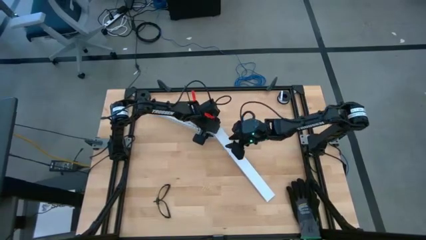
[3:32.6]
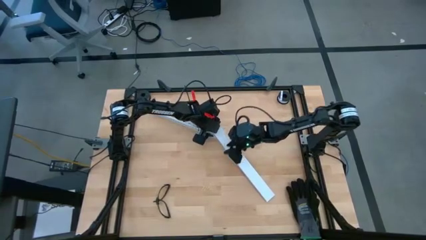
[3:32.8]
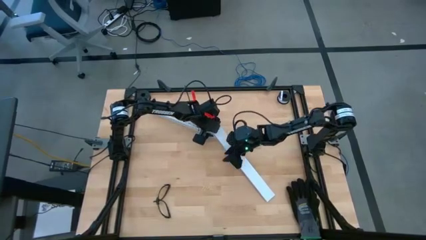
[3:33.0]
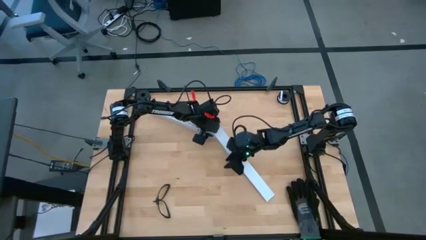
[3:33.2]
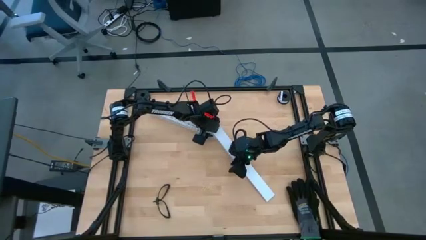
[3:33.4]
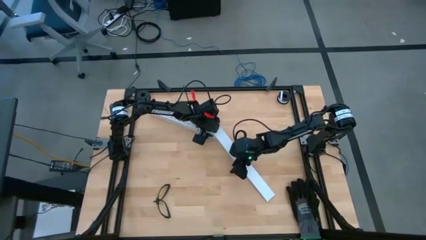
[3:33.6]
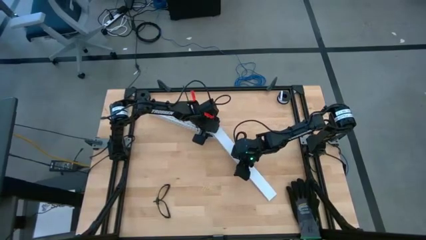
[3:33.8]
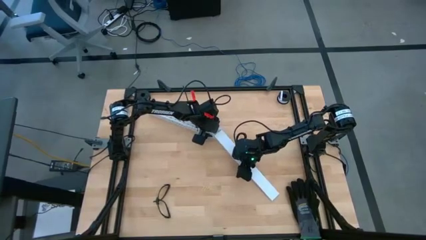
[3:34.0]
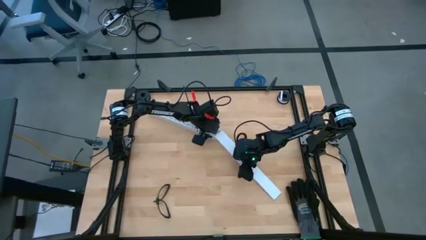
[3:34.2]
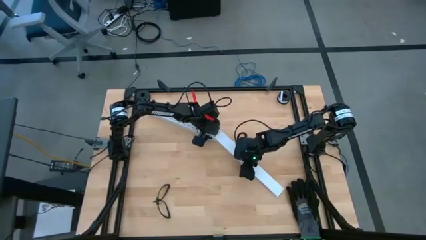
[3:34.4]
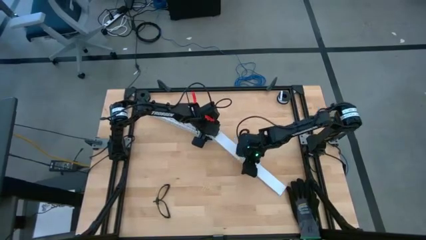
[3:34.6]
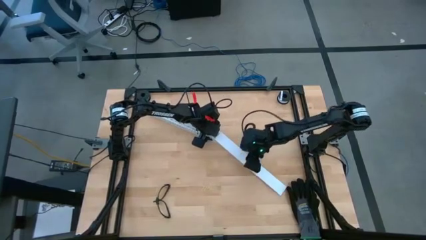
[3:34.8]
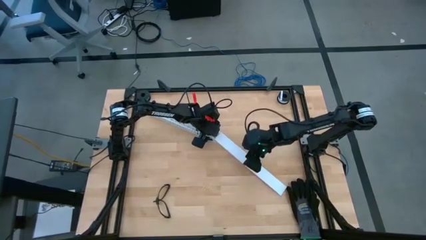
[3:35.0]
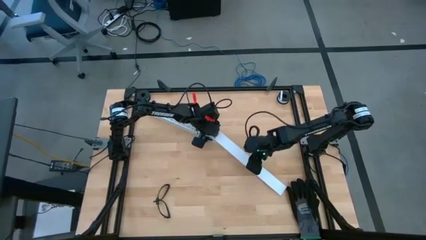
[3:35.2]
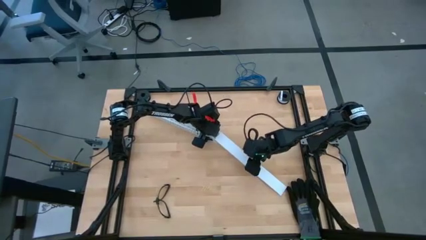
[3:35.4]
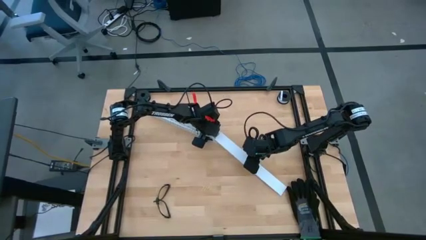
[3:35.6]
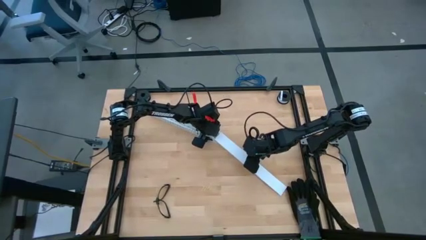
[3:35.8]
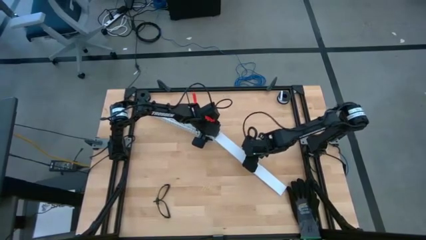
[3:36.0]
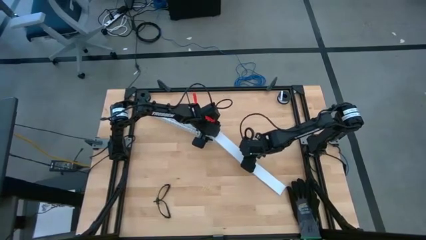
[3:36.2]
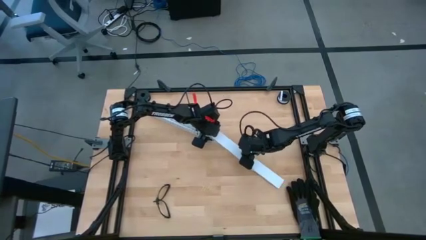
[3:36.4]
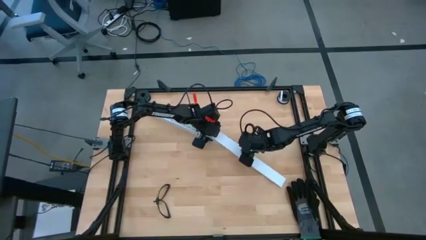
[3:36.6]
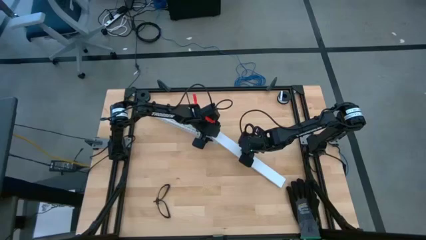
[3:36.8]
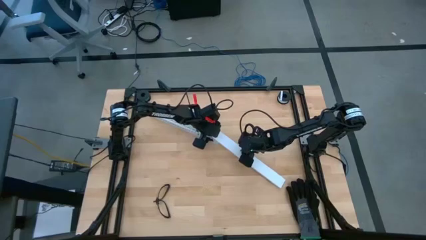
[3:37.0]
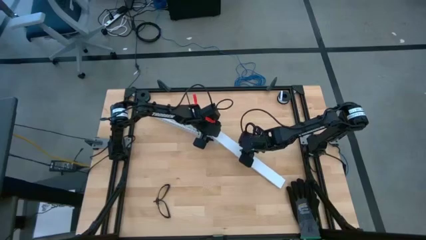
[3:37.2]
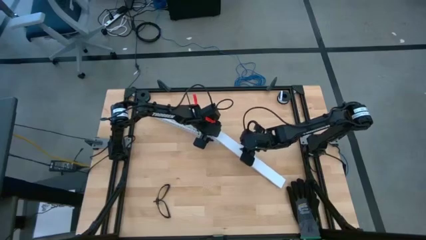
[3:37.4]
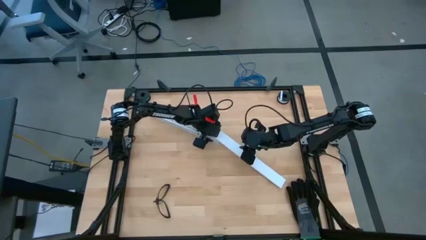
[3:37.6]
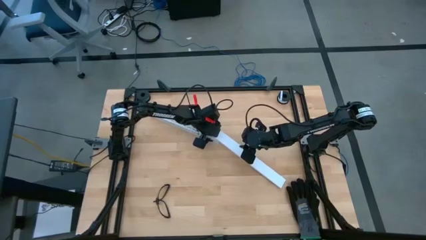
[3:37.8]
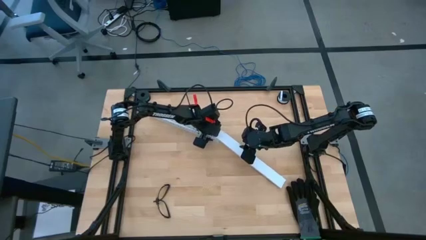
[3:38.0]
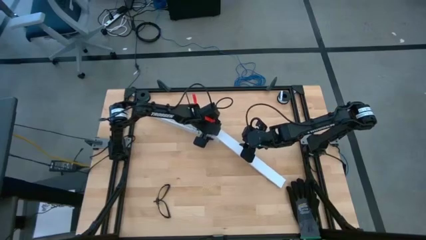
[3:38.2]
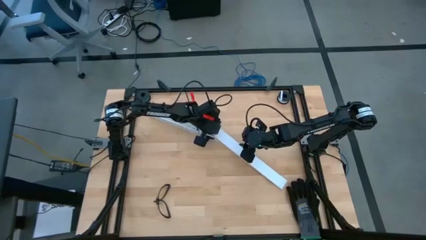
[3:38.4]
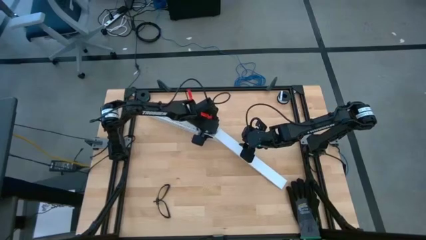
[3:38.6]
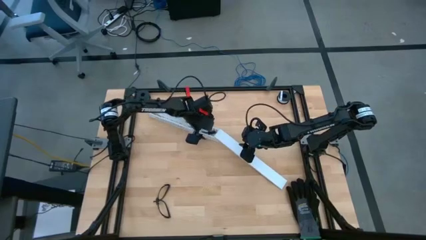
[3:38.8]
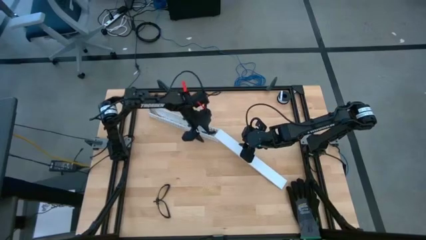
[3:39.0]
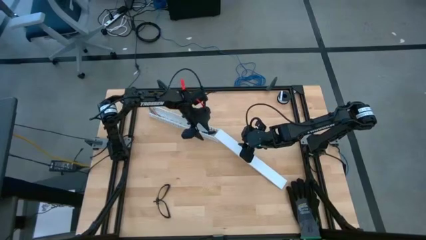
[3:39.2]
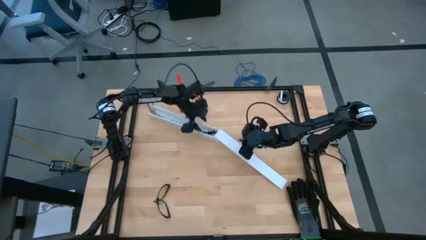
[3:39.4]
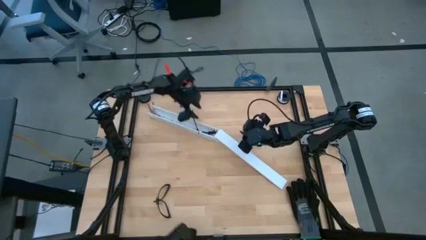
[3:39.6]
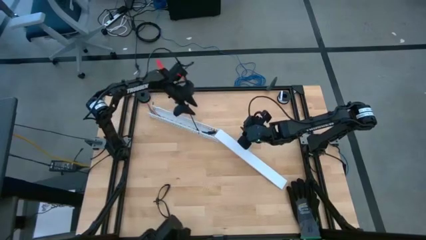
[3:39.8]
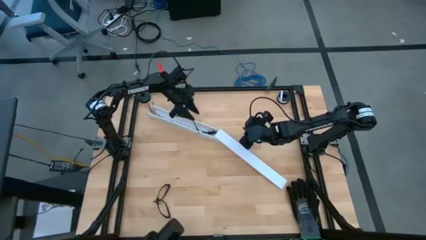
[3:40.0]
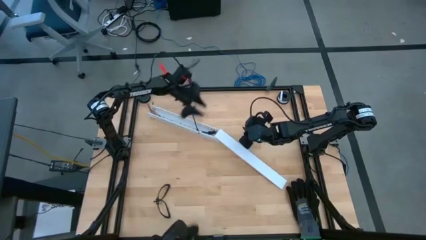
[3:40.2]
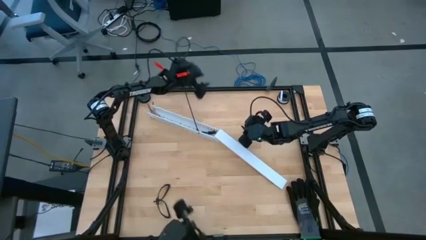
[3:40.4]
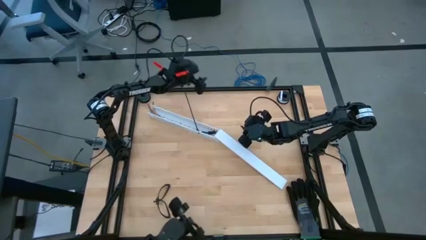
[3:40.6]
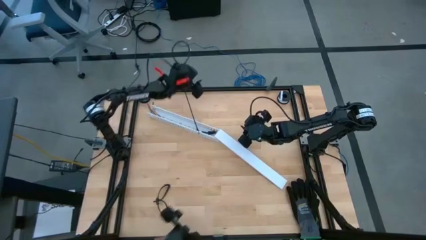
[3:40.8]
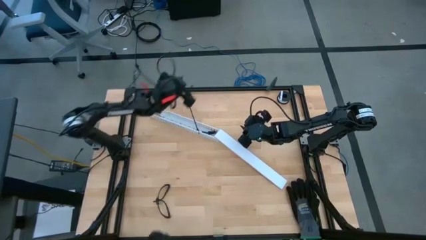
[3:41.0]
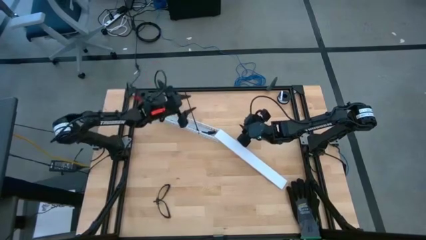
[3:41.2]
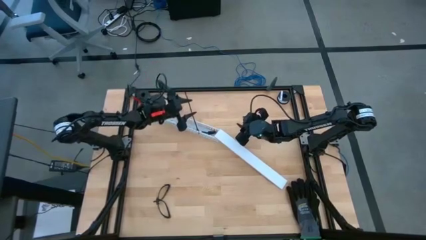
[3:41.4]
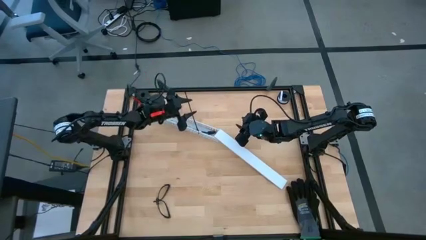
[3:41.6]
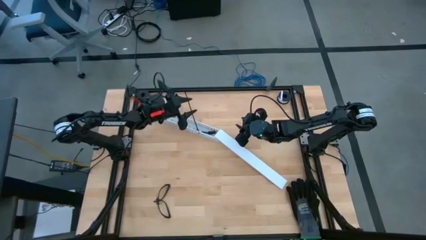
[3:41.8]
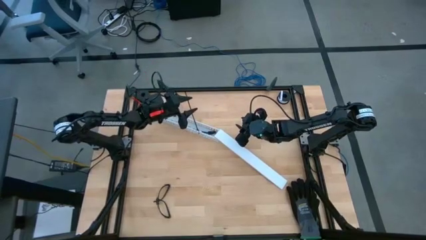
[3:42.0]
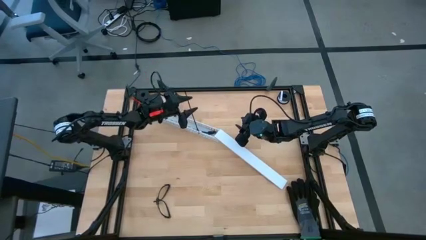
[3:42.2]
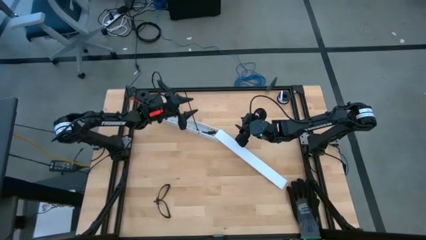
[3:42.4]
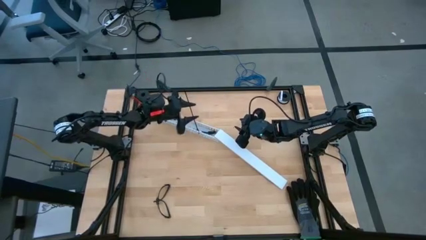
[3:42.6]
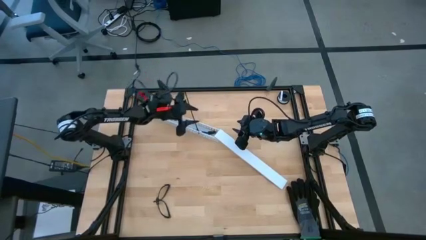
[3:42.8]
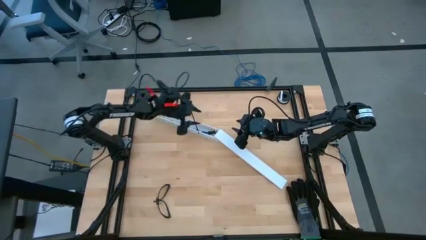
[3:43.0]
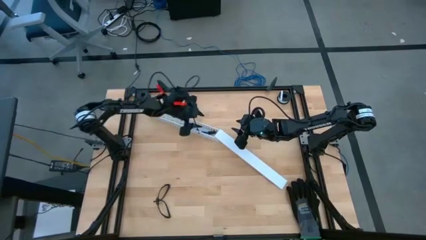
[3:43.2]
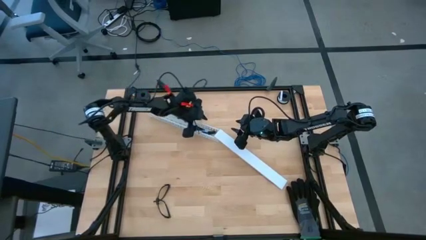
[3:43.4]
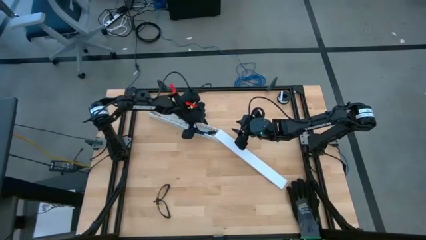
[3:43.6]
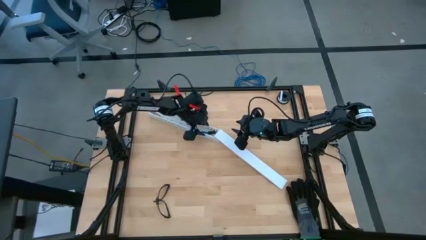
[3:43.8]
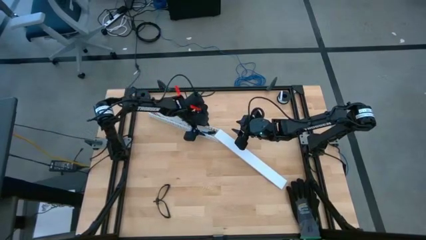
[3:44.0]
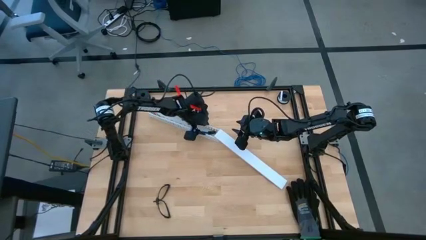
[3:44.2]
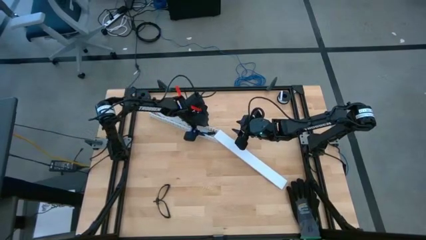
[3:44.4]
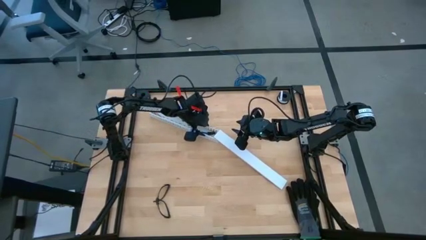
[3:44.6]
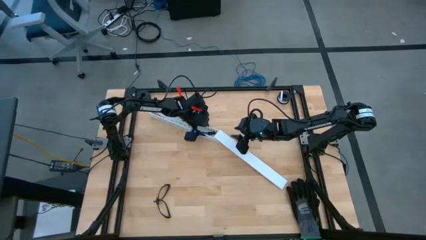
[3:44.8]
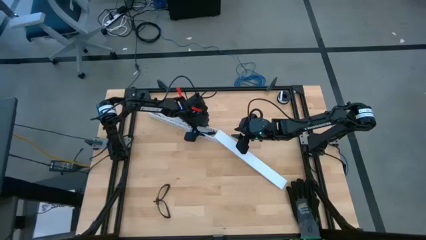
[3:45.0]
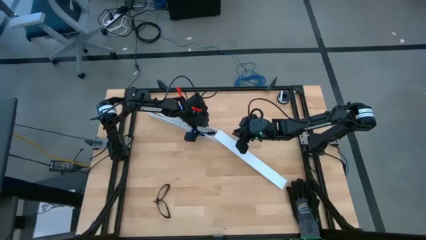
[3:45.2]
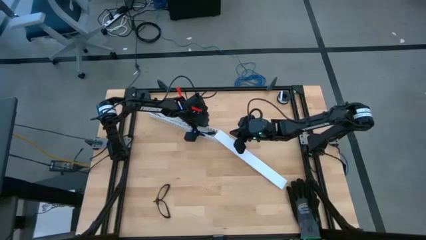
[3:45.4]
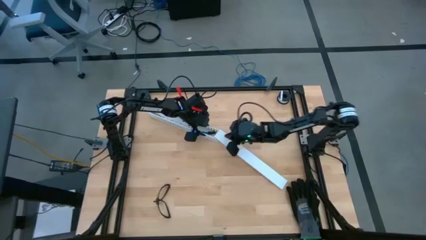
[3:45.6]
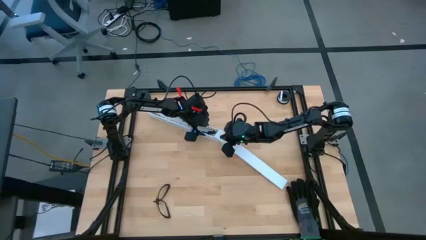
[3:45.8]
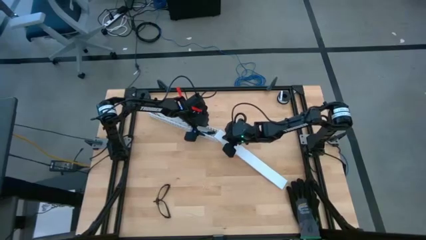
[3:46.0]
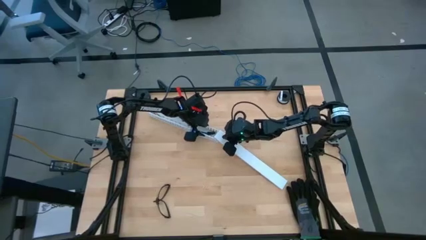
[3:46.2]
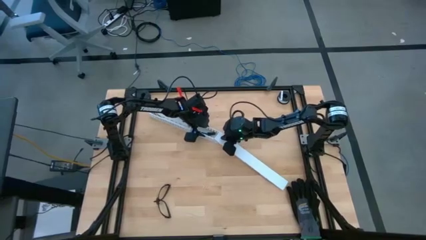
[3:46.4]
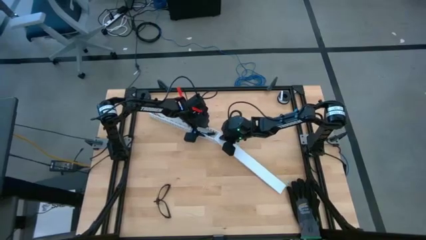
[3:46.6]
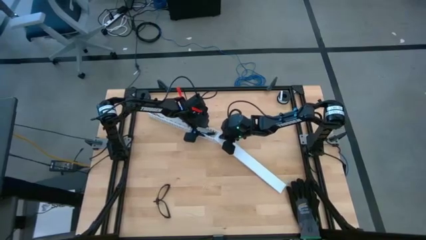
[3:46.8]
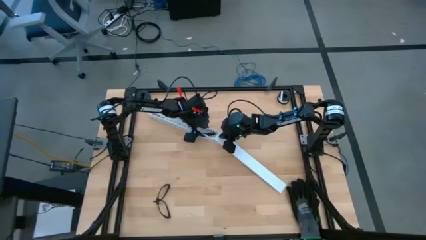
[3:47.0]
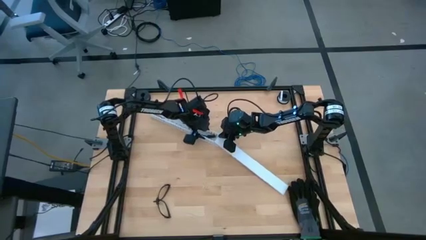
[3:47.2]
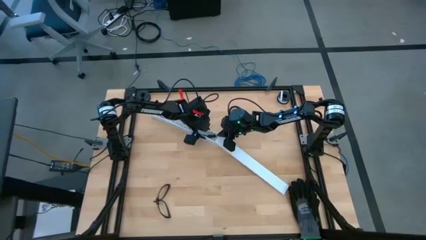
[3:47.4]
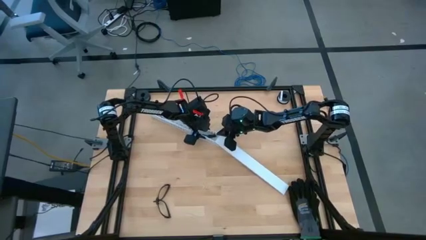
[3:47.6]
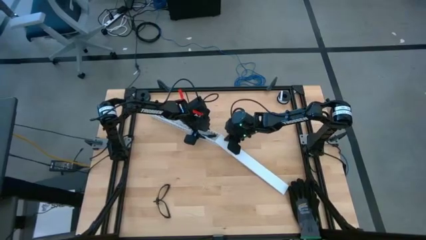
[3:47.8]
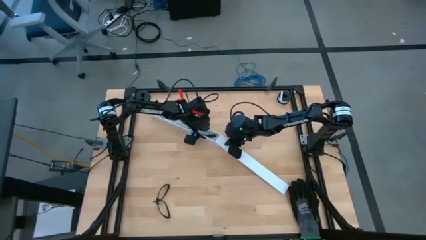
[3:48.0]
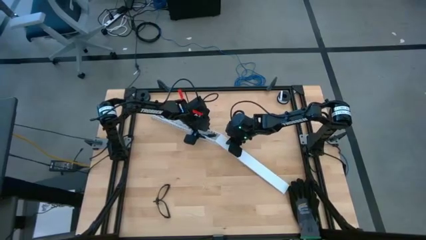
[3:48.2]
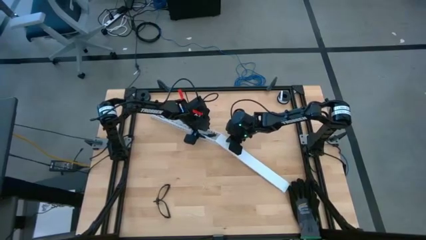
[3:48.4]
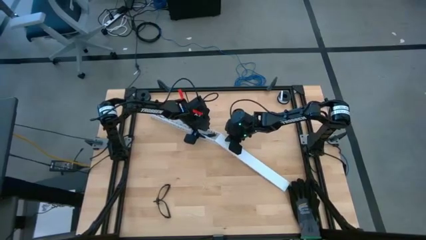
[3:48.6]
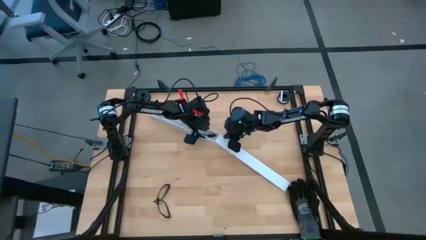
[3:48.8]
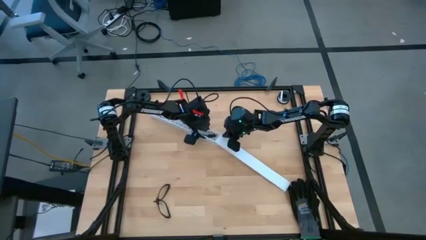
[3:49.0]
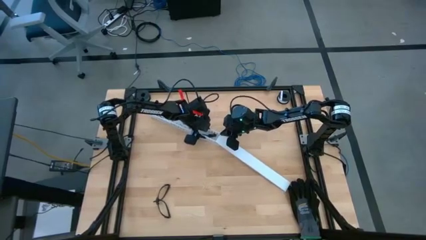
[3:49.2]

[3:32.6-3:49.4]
Task: Ziptie cables
Close the white cable duct lid
